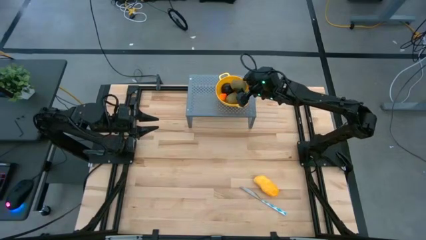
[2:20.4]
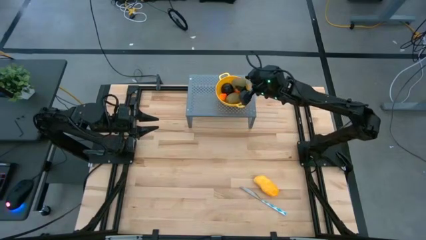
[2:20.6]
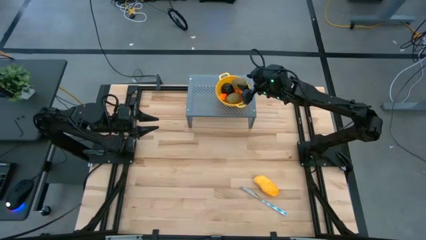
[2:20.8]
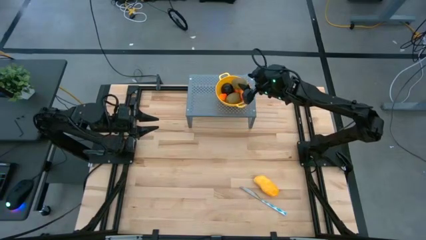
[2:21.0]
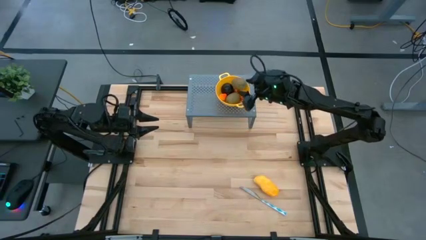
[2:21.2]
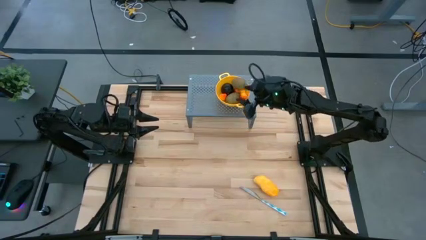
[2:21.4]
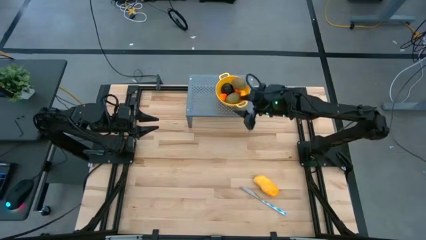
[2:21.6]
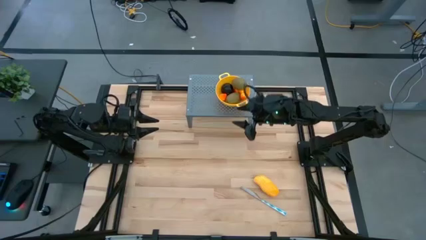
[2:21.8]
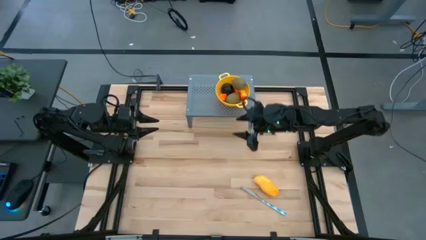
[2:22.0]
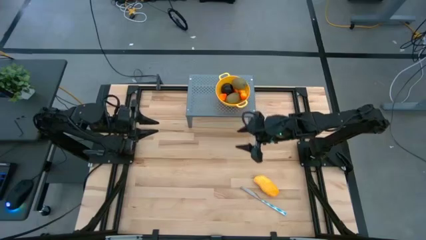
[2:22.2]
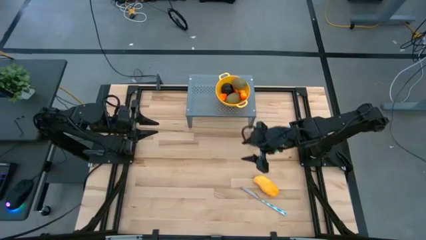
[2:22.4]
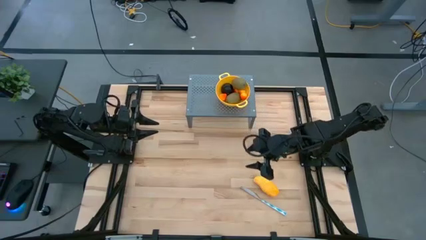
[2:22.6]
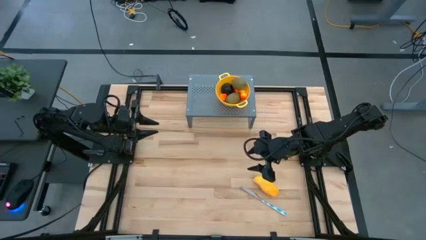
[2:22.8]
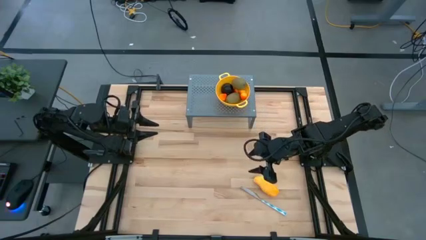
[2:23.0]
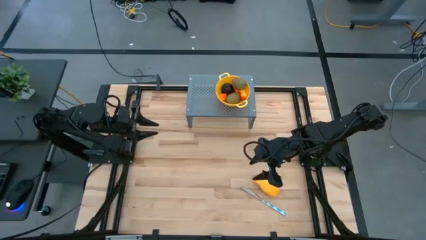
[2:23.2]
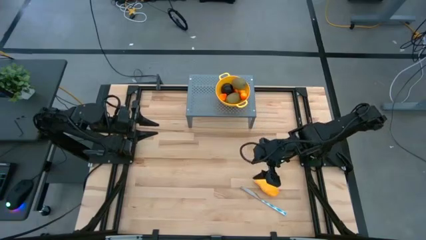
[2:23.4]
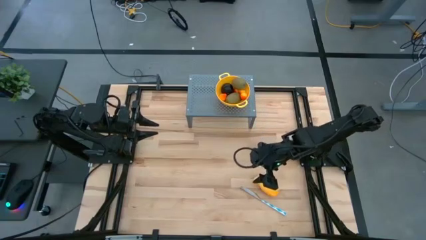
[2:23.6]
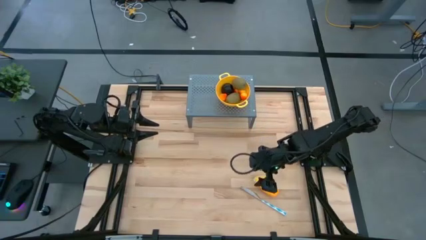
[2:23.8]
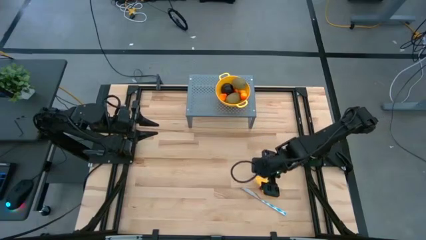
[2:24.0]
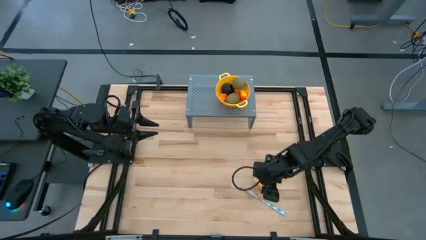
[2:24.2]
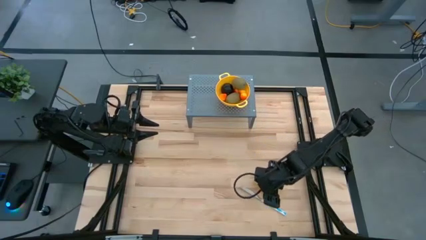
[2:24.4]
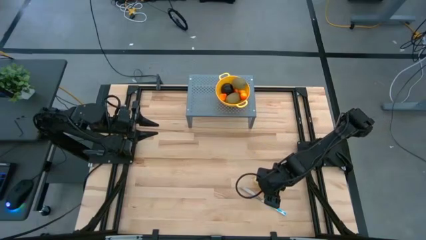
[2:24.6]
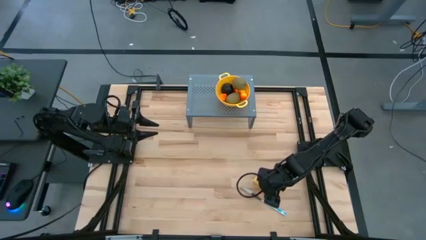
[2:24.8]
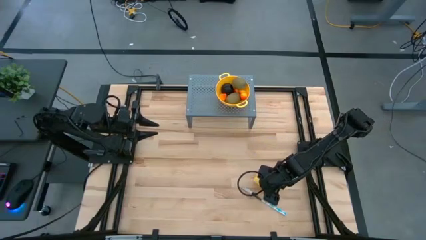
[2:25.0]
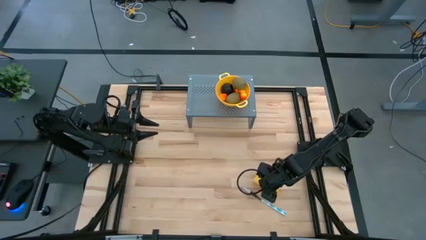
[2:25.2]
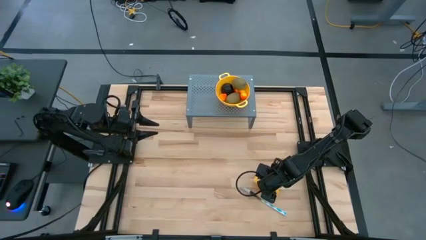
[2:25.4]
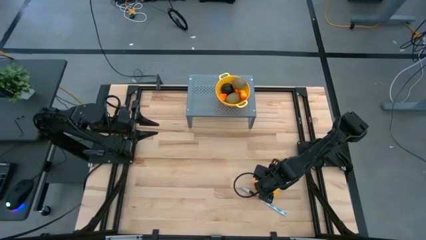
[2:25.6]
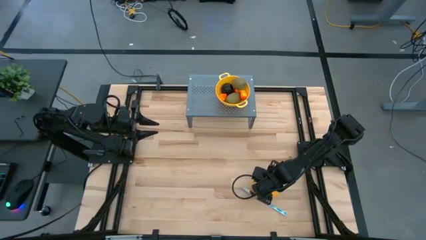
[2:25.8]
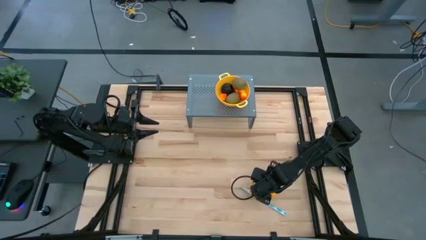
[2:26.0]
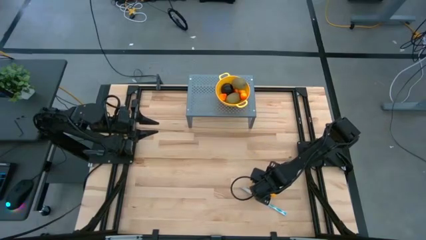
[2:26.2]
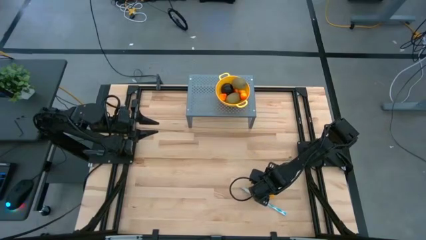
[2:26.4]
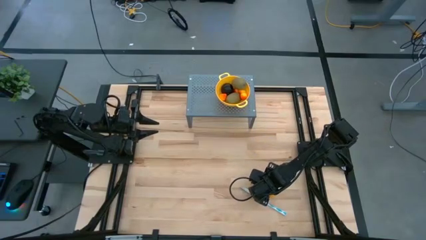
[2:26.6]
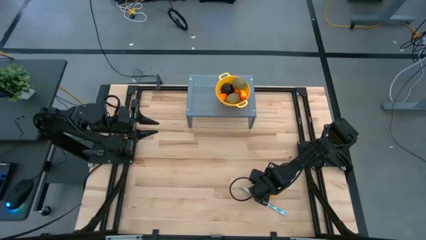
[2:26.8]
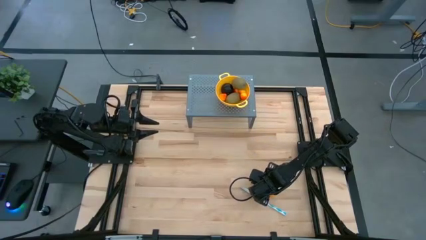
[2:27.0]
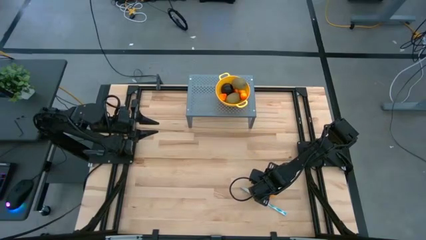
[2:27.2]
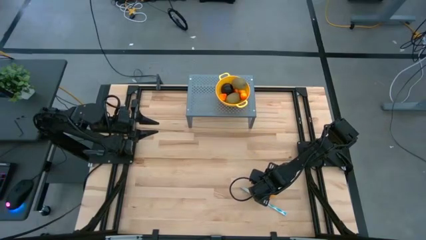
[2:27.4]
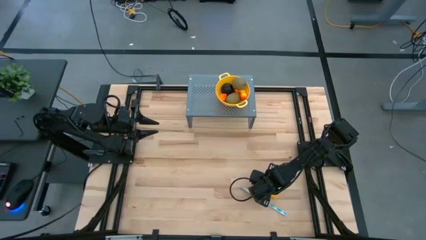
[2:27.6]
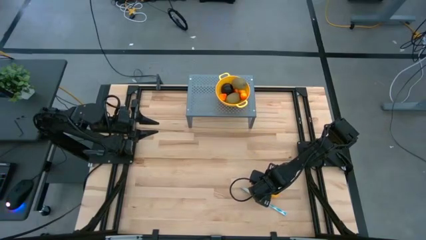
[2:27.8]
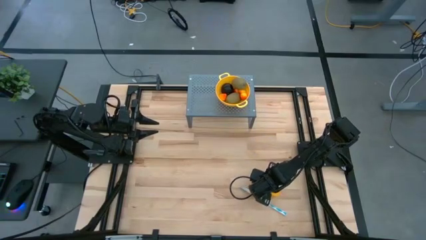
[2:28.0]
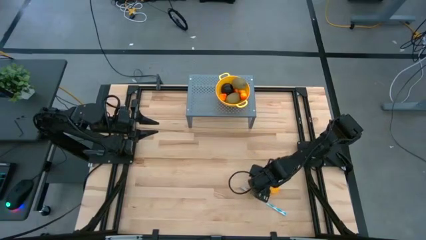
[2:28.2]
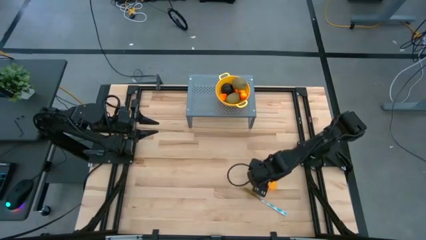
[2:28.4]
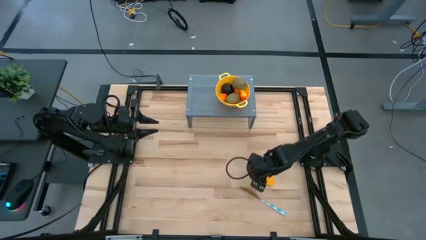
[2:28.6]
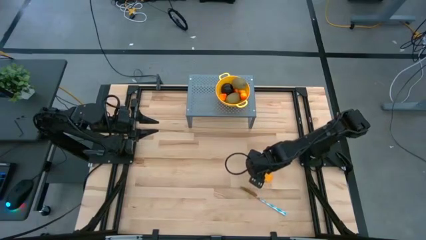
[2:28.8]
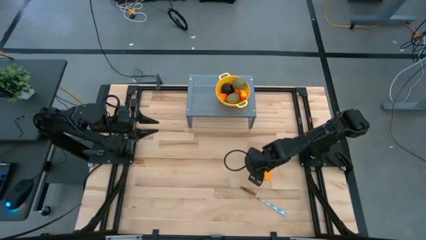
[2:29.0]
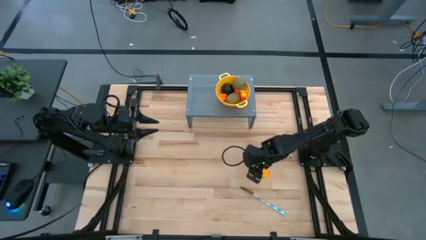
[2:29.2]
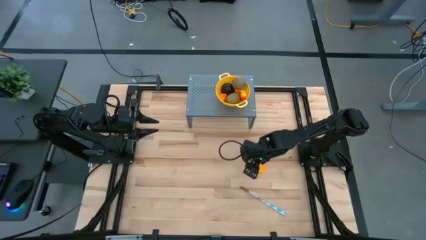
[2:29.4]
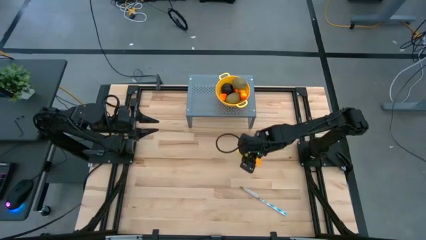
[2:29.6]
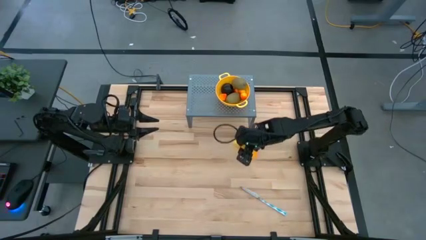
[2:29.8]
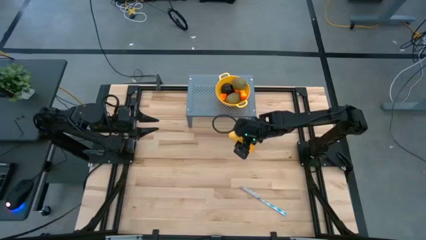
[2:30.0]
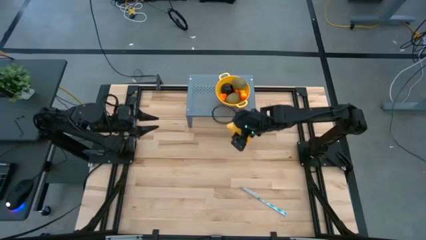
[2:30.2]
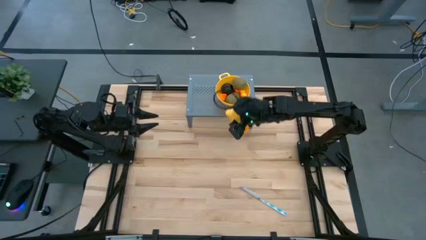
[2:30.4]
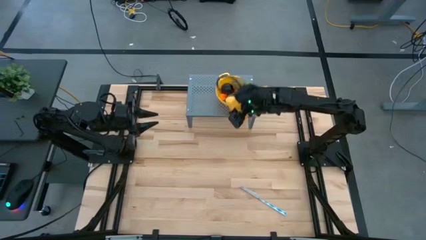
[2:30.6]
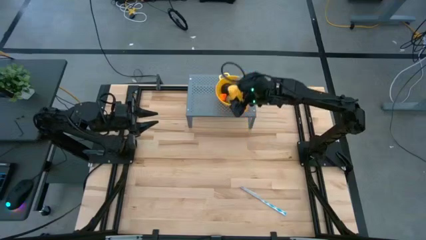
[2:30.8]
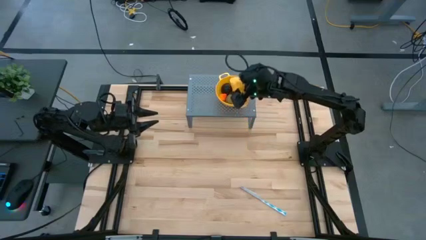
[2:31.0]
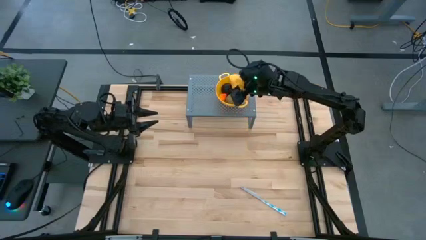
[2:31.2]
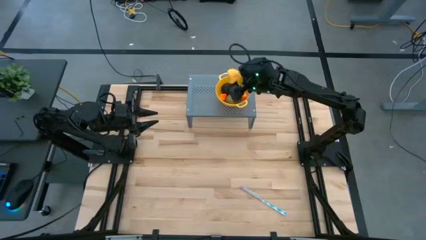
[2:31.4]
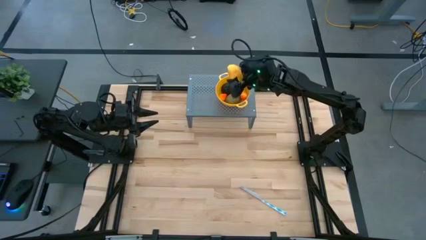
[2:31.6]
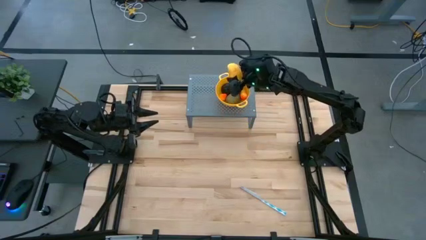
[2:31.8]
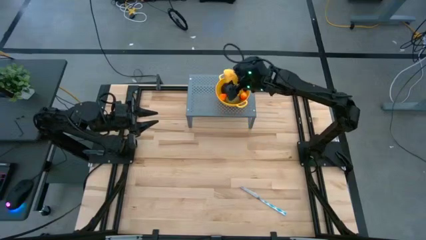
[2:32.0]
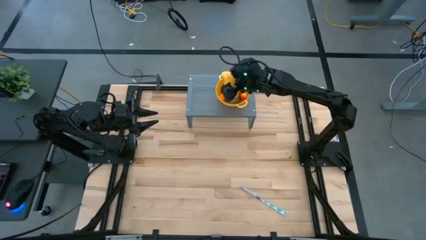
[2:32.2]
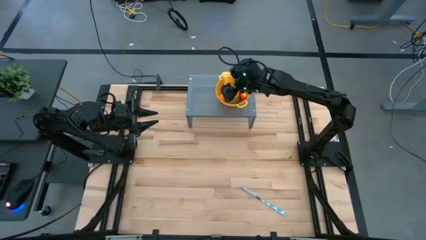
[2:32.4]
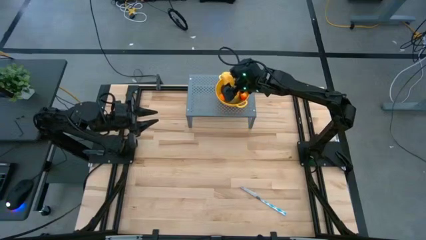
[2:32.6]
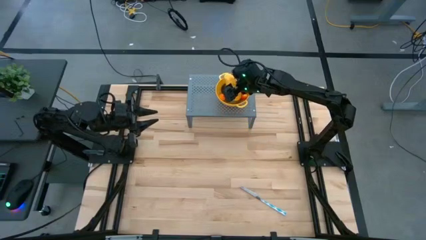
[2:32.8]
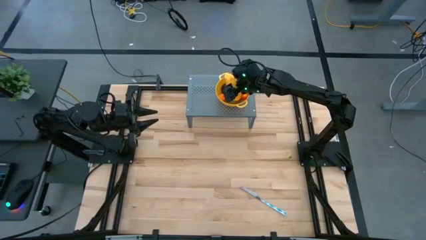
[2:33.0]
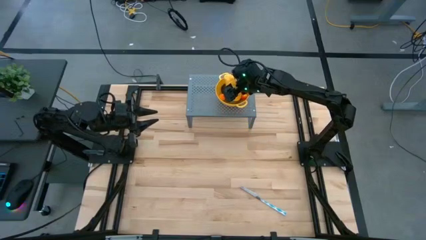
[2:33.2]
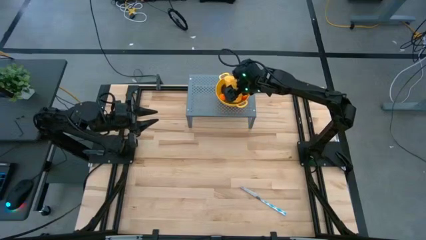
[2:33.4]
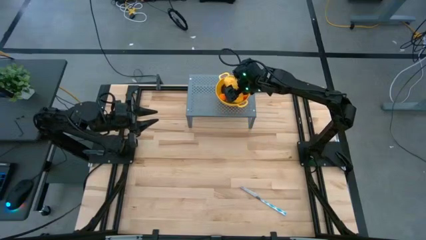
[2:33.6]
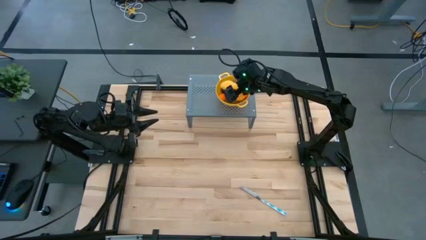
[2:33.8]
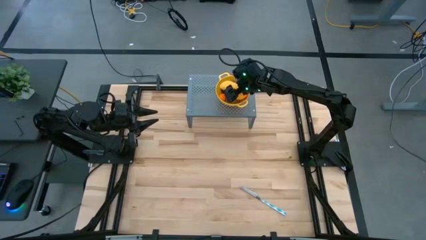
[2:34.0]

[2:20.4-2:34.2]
Task: Pick & Place Fruit
Put the mango into the yellow strainer bowl on the shelf
